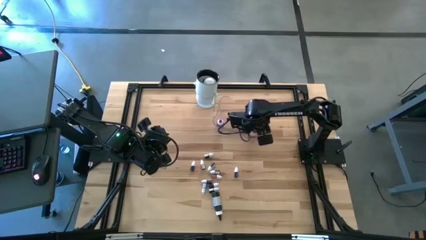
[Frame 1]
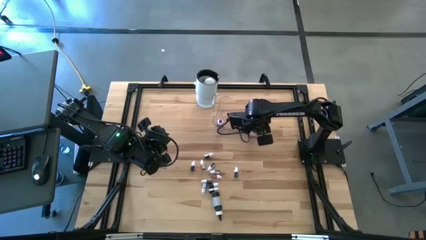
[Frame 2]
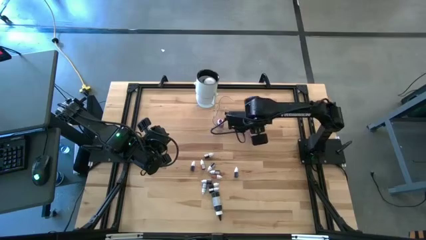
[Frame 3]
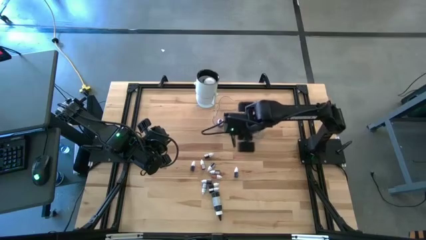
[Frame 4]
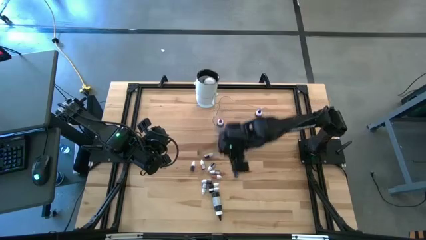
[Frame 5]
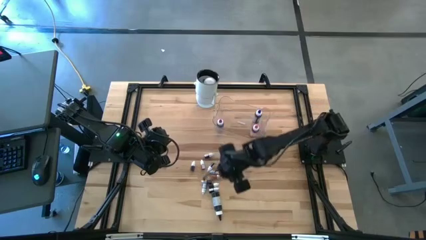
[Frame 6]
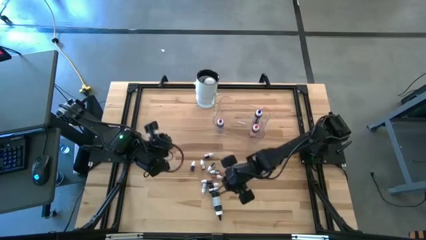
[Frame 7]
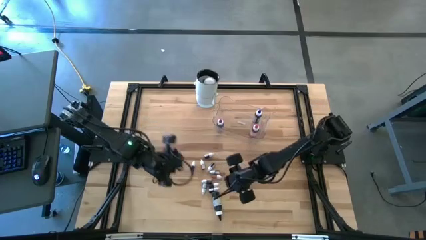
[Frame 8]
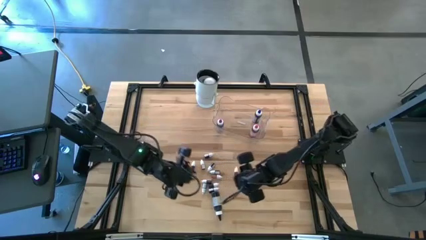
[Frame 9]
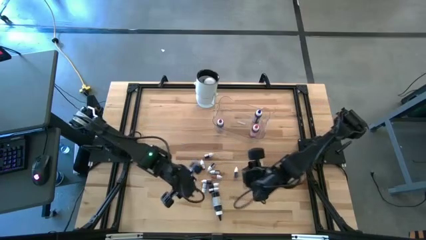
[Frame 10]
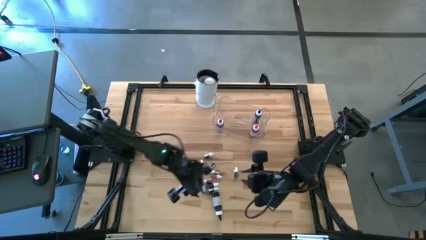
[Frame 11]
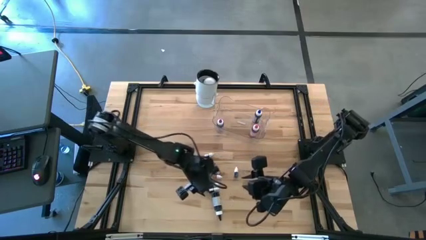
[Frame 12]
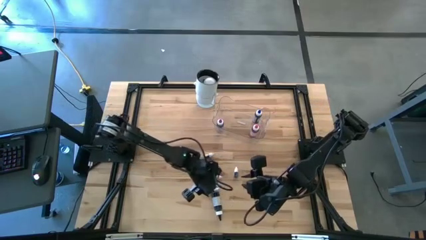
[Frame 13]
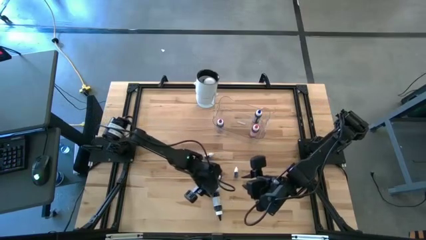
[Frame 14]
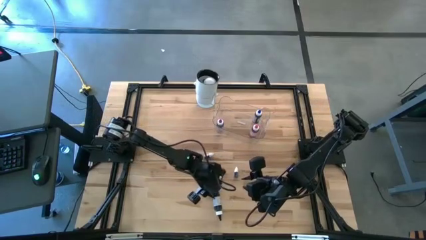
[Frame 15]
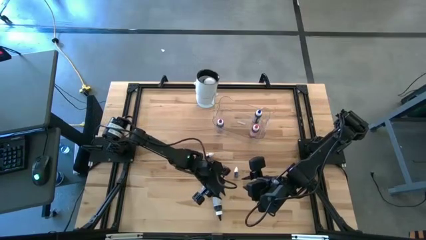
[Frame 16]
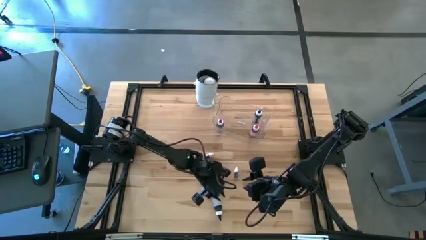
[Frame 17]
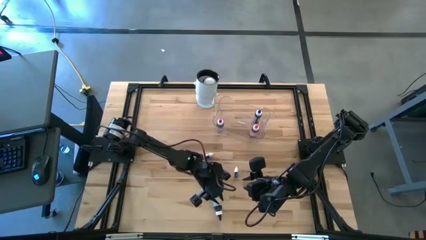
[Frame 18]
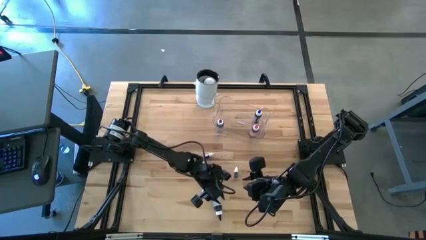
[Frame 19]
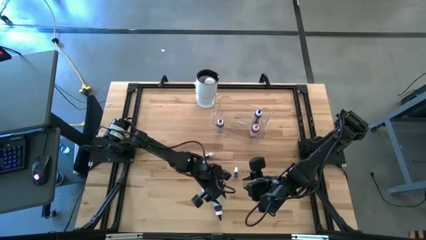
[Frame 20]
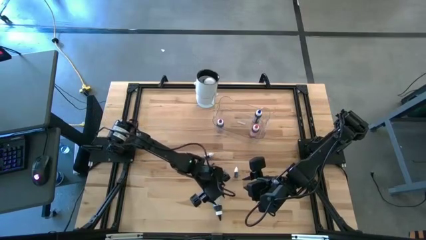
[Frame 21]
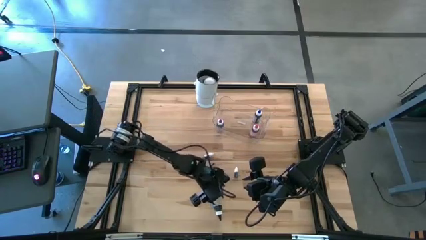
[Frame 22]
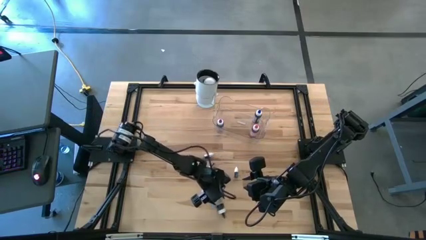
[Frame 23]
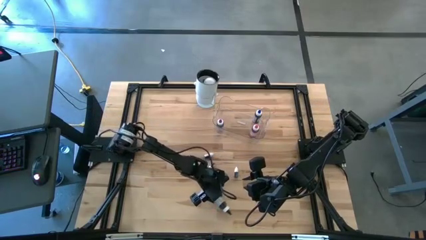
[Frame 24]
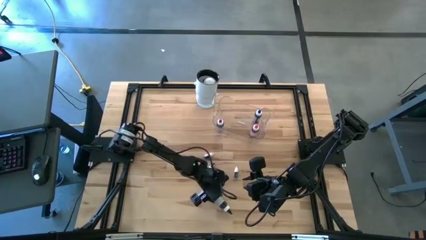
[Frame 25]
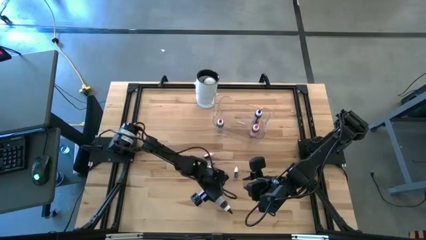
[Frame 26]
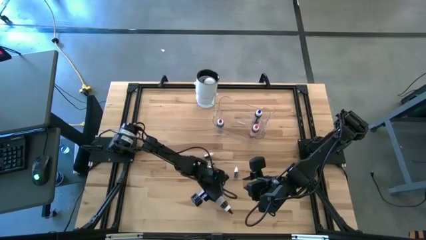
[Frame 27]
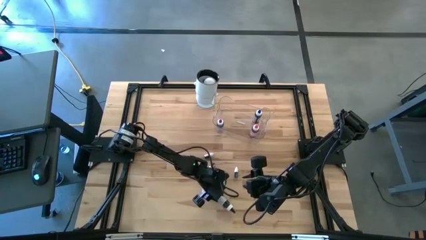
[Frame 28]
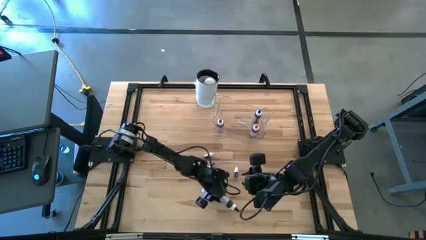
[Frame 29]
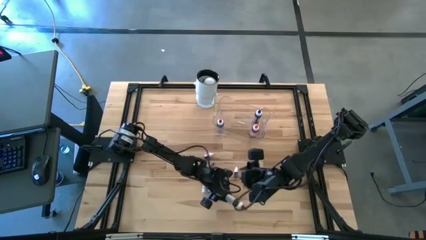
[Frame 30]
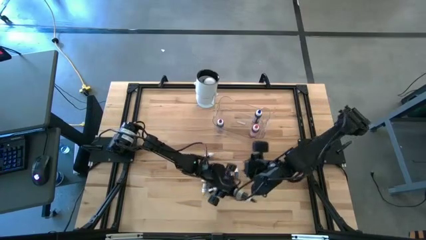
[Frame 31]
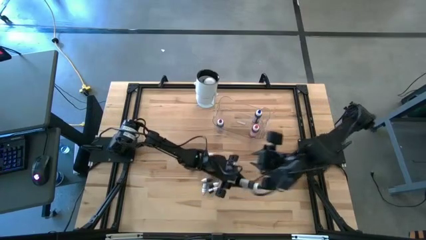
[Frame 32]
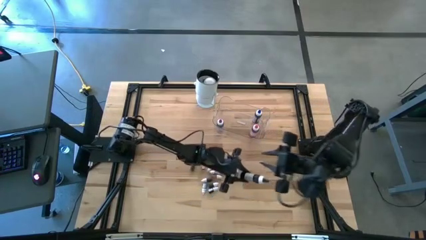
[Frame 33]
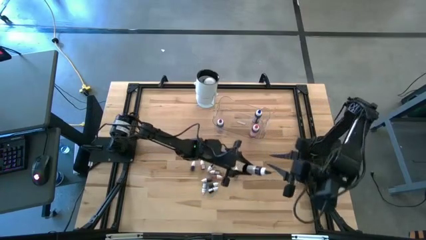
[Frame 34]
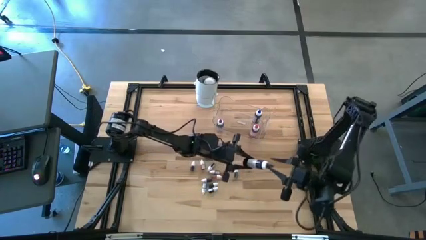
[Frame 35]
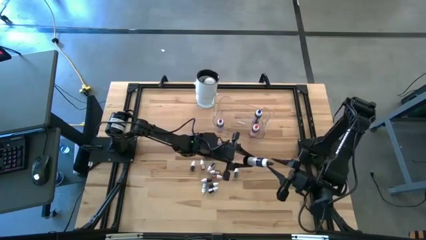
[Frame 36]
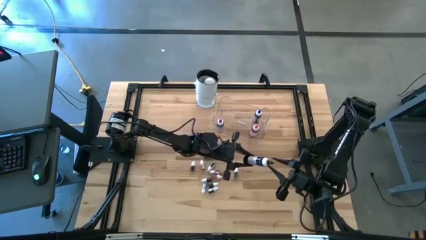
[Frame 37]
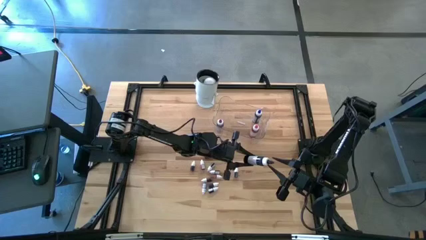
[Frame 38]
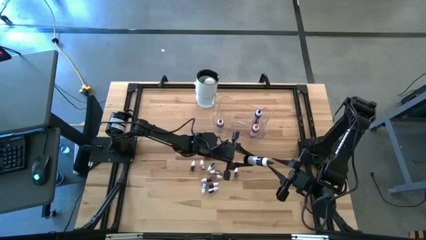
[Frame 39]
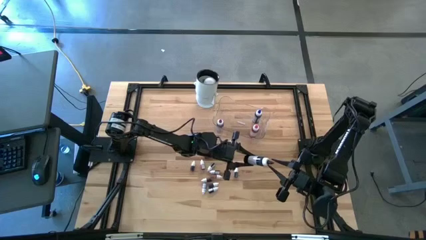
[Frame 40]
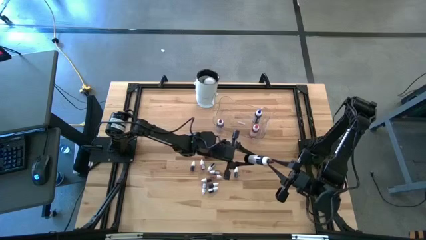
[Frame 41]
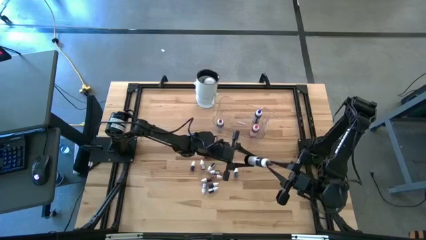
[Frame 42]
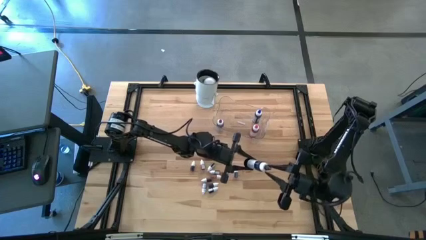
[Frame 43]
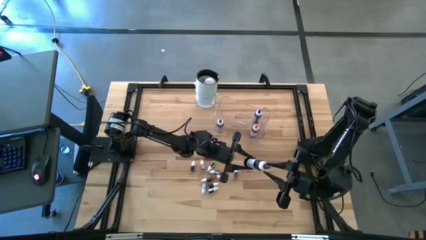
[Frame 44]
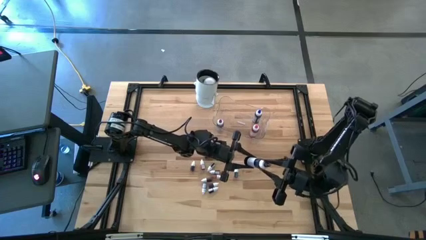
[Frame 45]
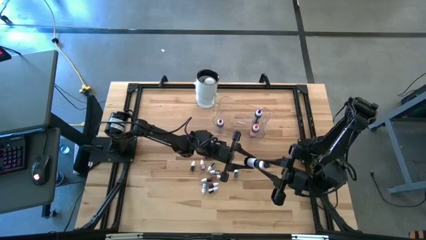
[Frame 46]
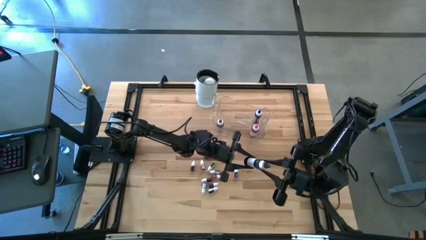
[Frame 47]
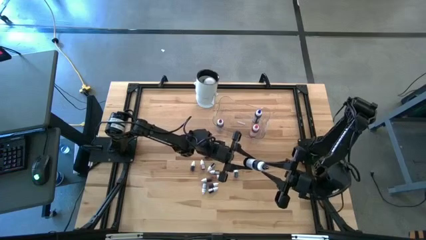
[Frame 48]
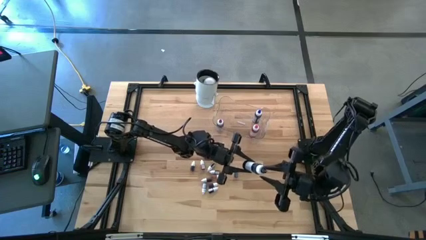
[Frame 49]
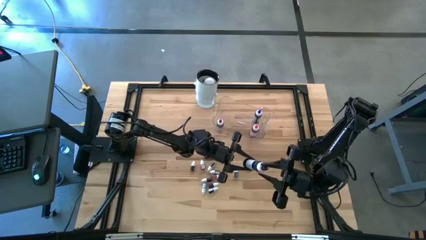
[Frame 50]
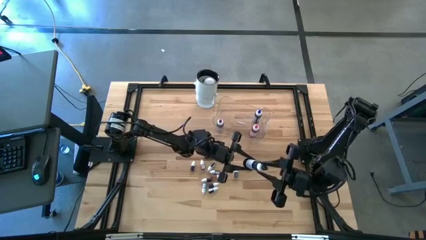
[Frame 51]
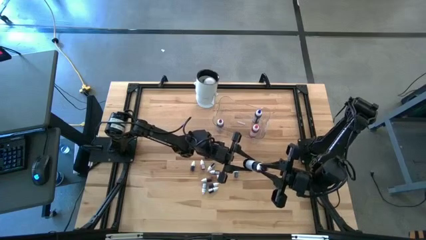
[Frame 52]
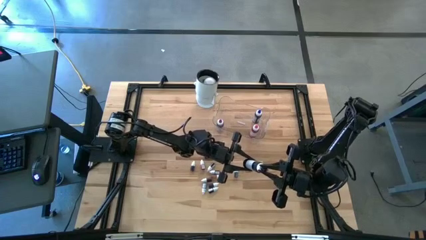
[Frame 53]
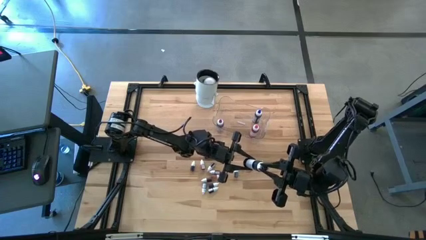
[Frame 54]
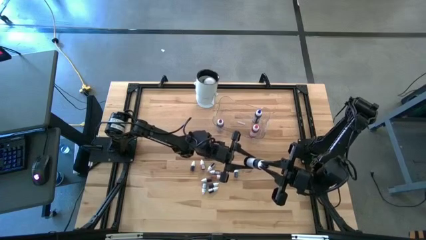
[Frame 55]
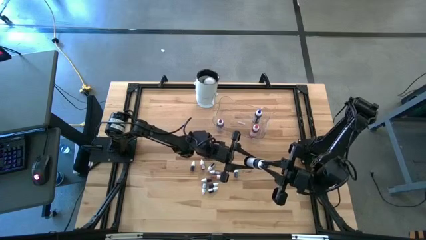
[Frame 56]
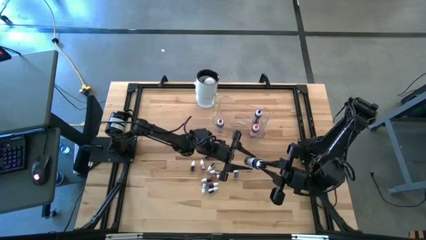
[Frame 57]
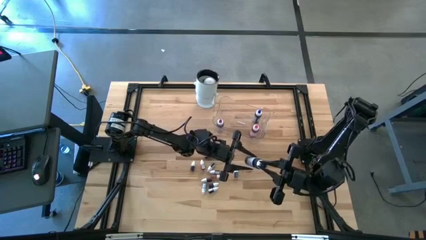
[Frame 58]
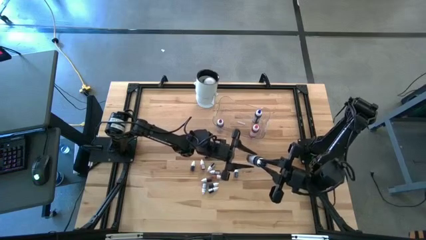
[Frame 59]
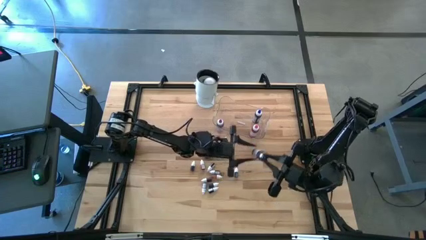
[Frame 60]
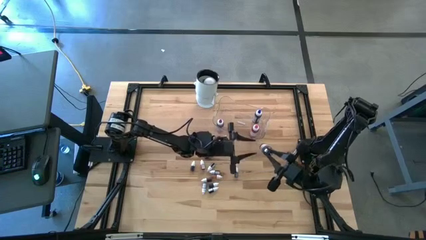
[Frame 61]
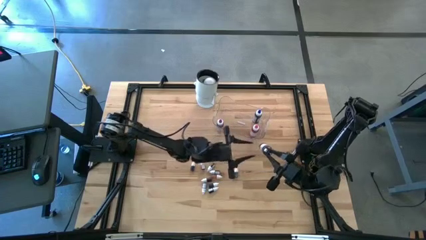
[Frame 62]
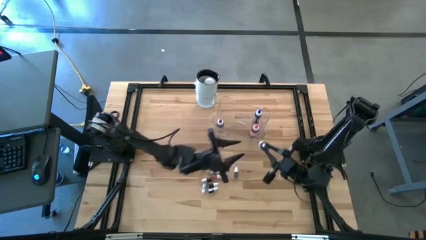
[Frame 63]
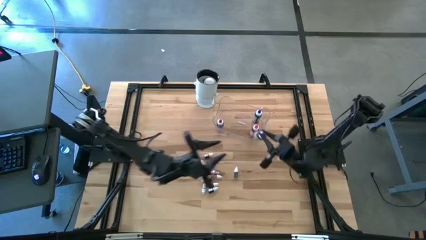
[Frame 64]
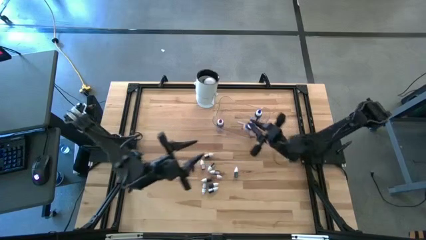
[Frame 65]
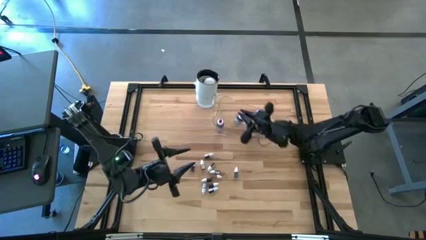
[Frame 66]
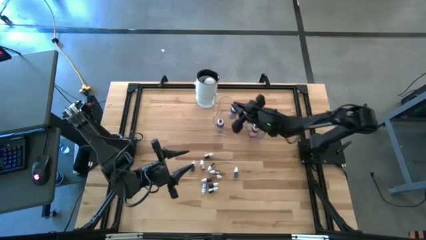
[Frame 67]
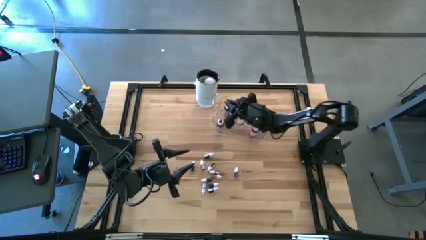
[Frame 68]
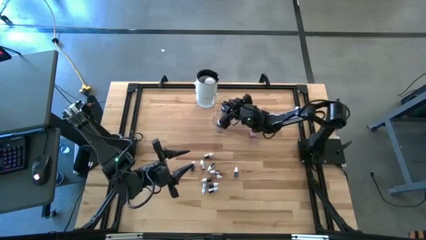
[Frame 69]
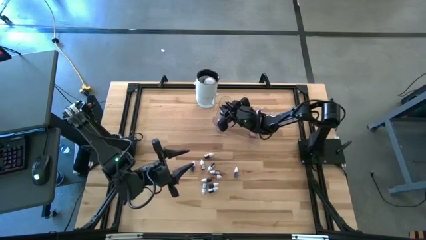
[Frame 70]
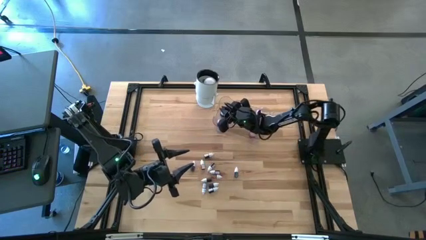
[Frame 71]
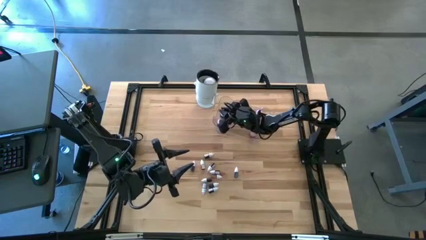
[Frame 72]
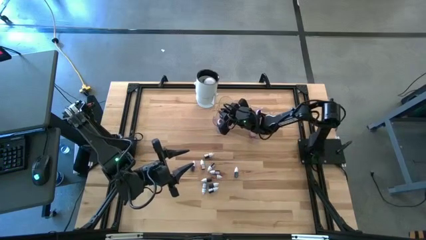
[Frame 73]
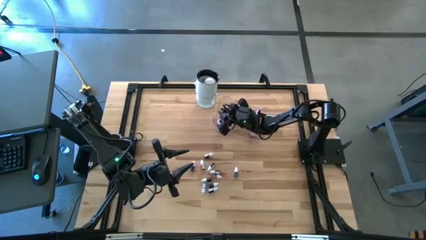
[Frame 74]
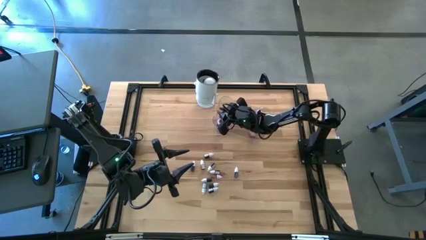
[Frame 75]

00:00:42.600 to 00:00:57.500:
Task: Pick & Place food coloring
Put the large black food coloring bottle into the transparent container

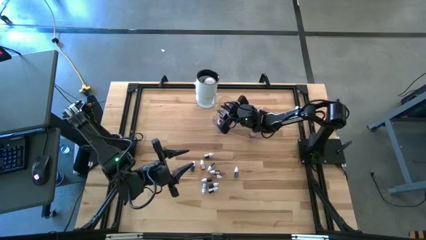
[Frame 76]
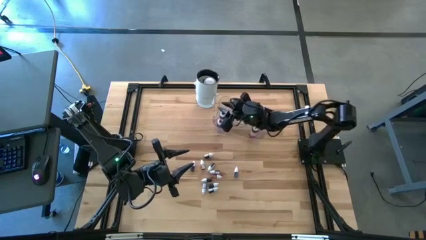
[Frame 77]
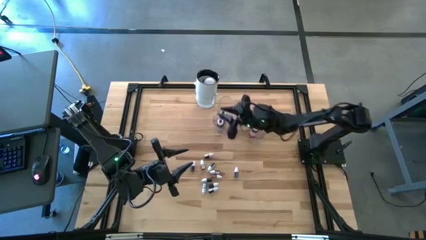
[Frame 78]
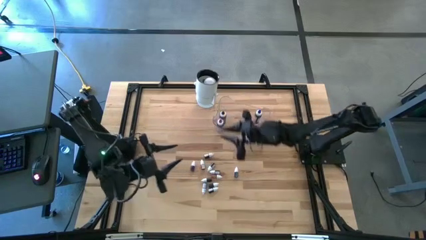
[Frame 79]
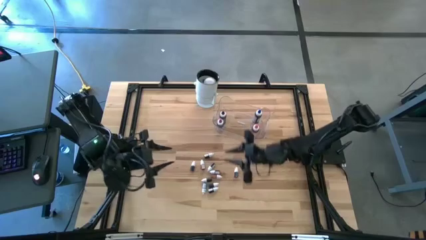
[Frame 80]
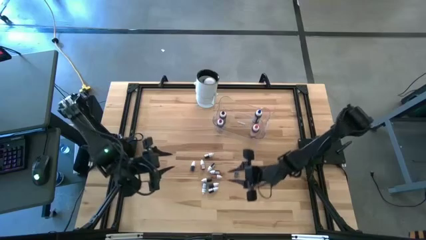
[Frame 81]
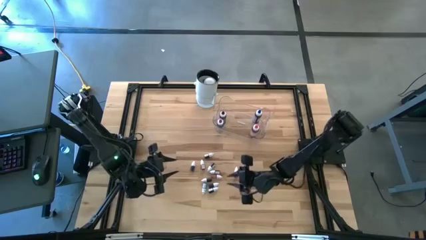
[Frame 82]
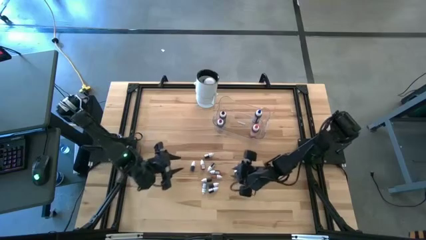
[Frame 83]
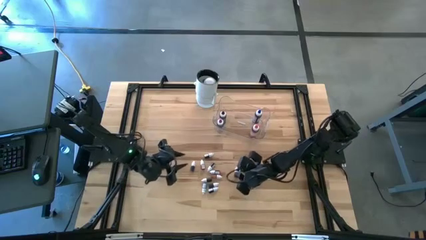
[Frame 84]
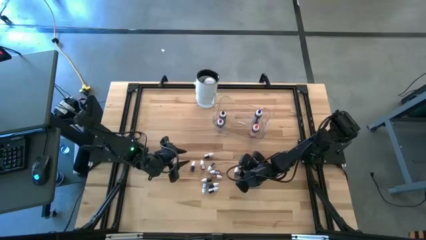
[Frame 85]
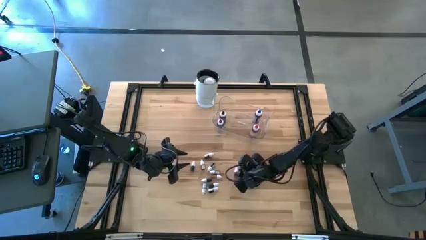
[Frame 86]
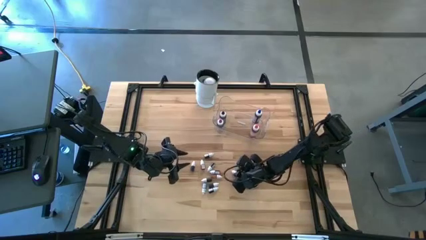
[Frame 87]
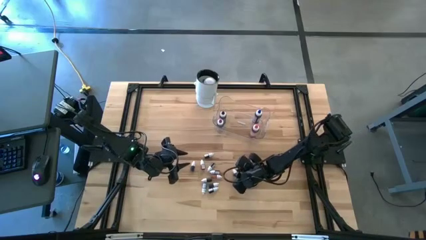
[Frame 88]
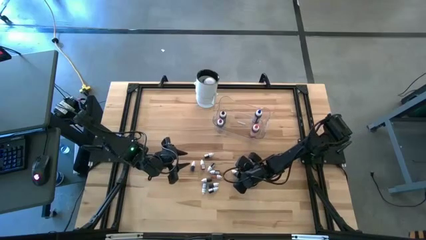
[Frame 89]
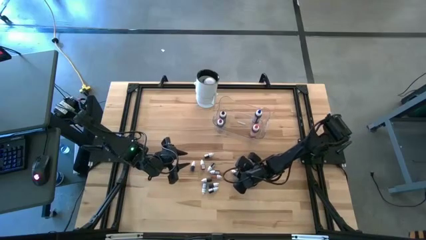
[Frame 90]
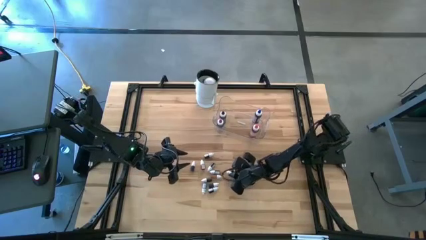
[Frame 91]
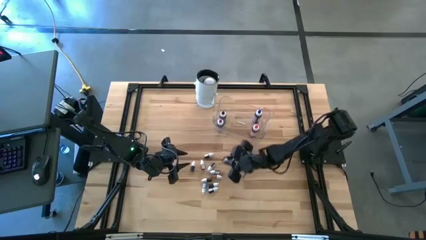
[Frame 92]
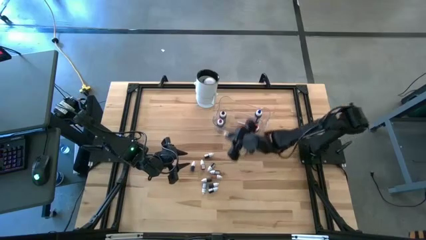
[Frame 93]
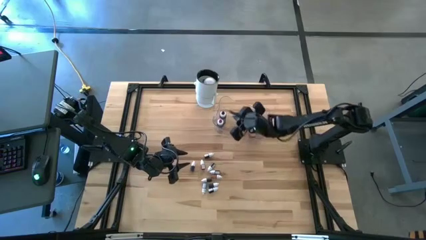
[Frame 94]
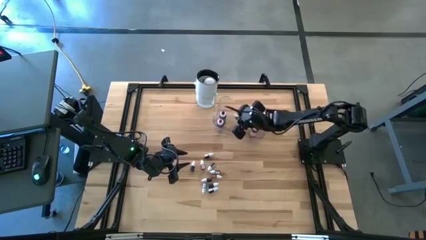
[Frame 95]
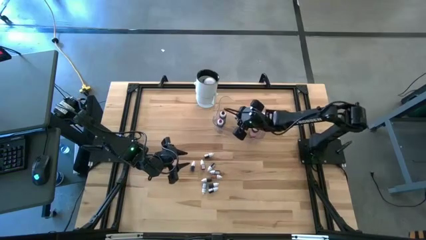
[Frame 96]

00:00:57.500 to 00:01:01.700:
Put the small green food coloring bottle into the transparent container
